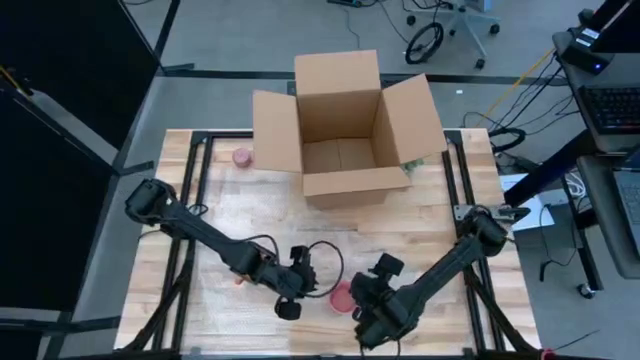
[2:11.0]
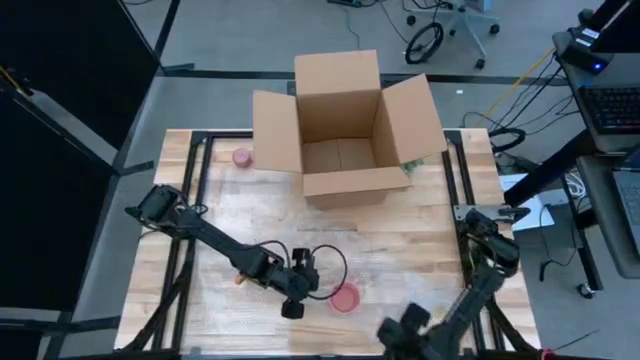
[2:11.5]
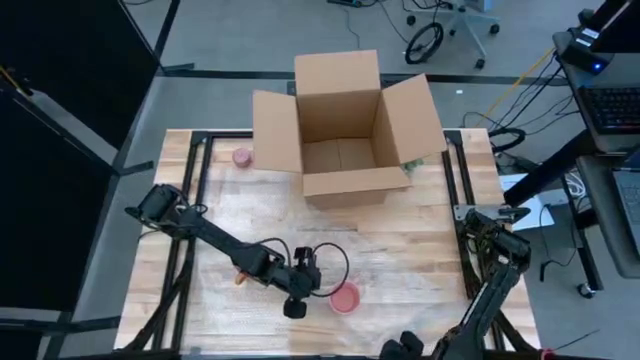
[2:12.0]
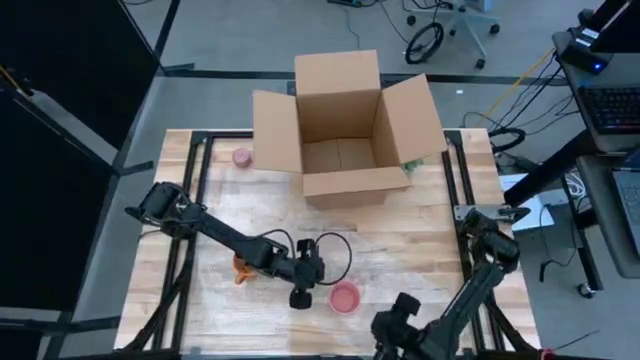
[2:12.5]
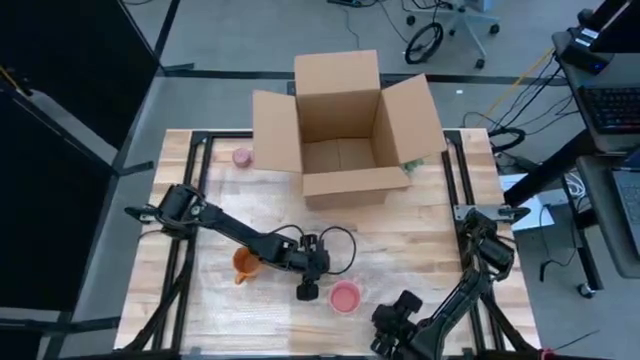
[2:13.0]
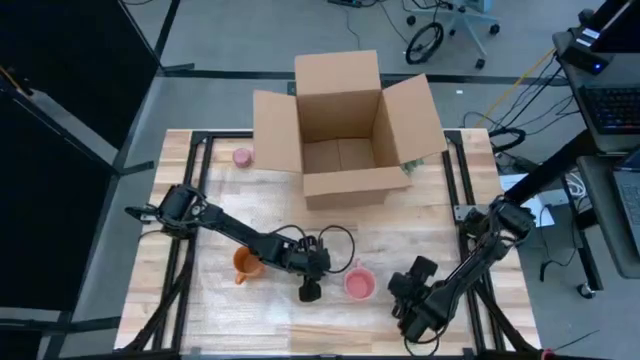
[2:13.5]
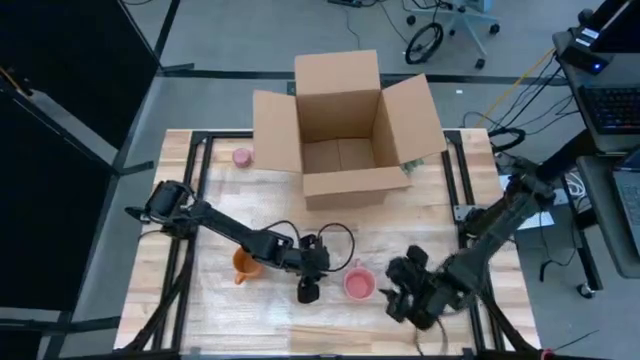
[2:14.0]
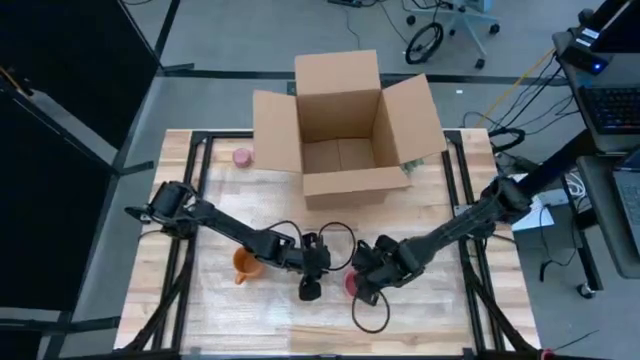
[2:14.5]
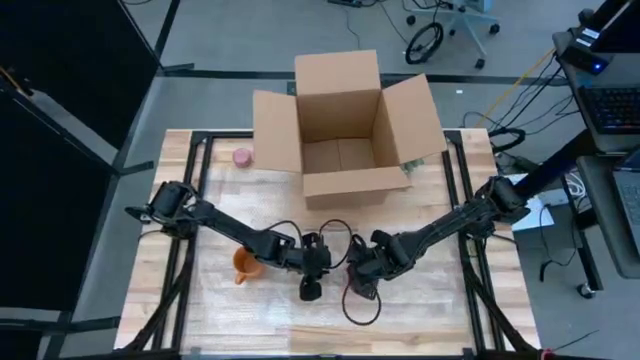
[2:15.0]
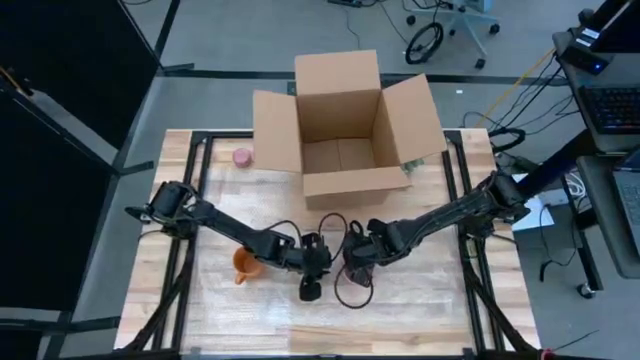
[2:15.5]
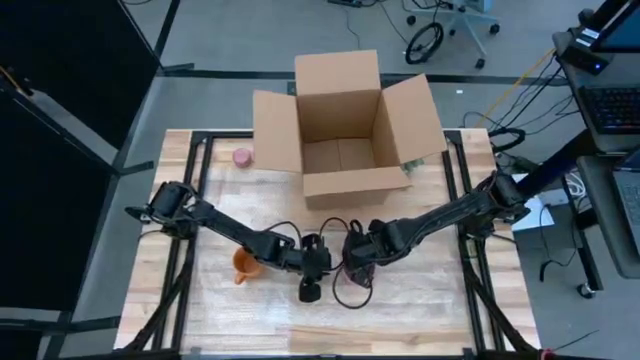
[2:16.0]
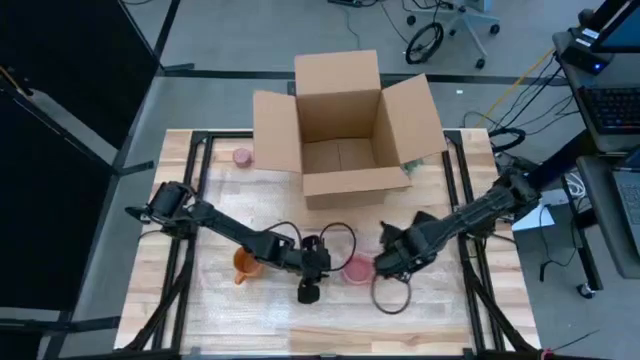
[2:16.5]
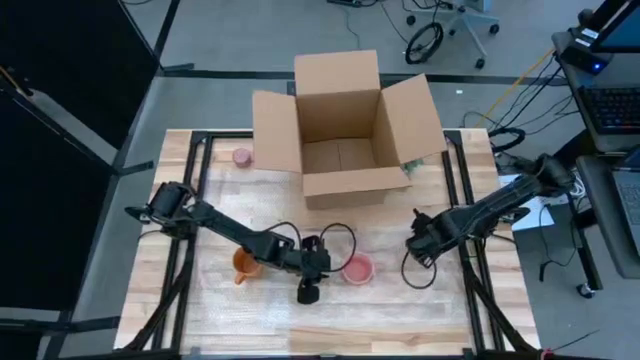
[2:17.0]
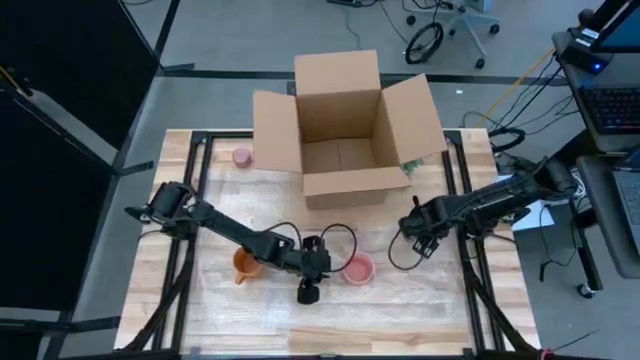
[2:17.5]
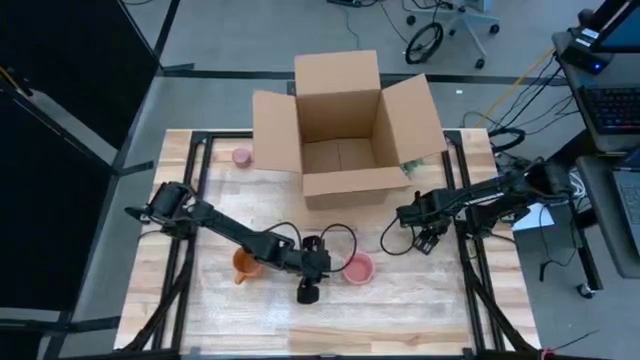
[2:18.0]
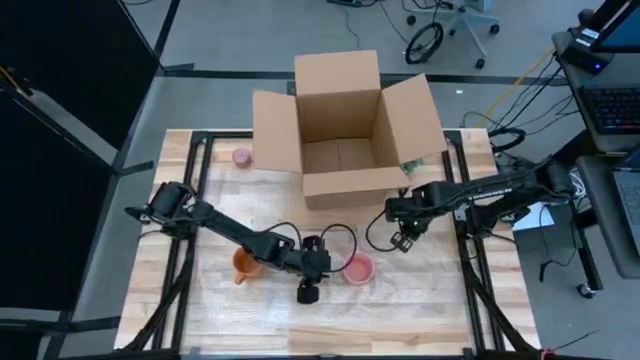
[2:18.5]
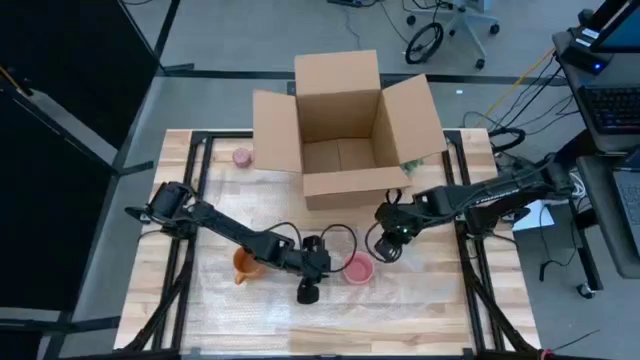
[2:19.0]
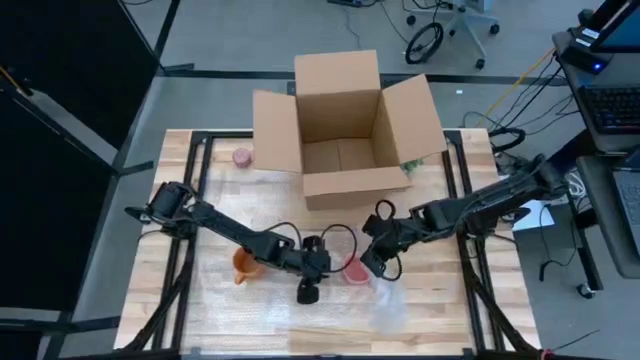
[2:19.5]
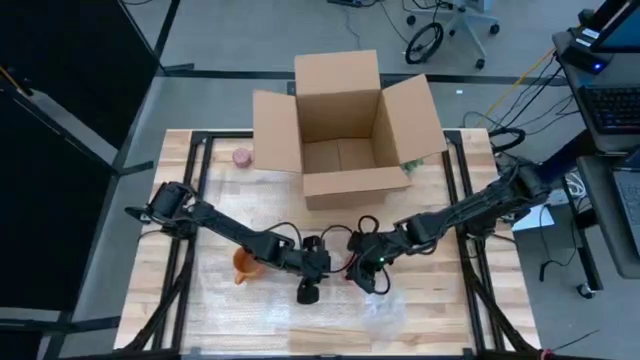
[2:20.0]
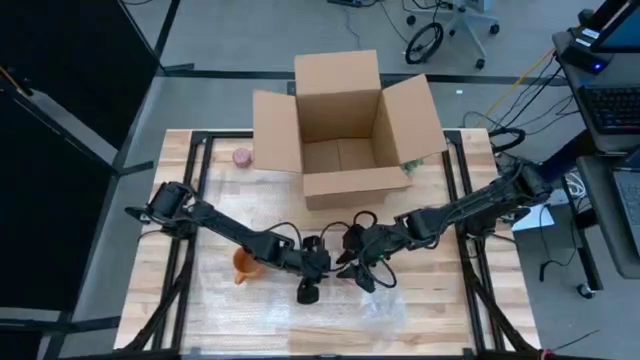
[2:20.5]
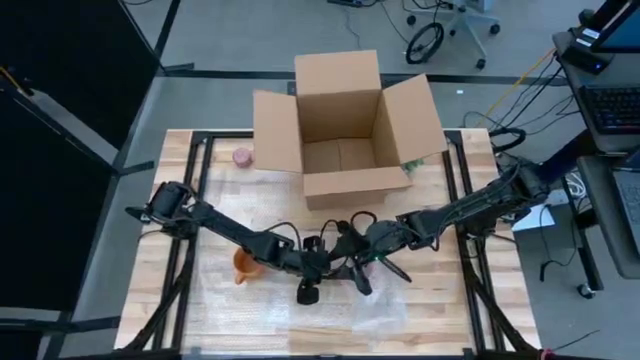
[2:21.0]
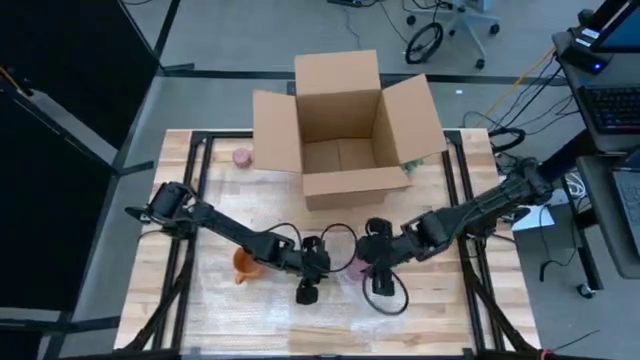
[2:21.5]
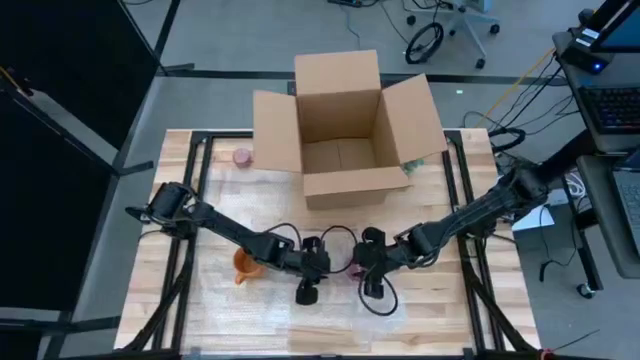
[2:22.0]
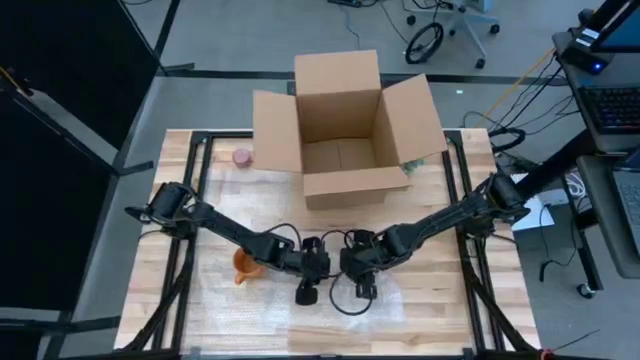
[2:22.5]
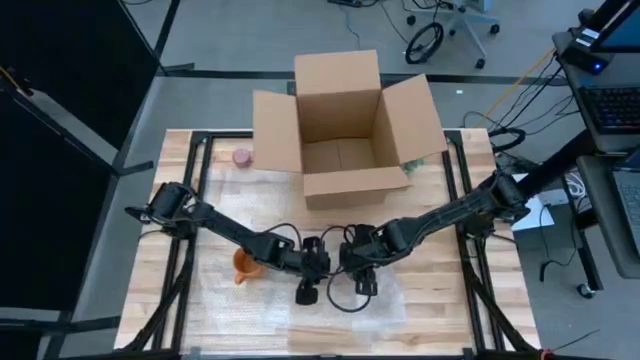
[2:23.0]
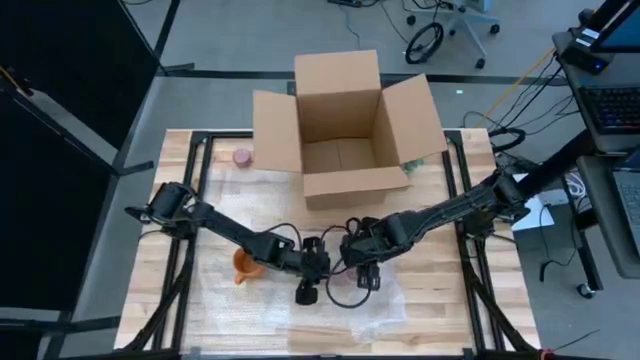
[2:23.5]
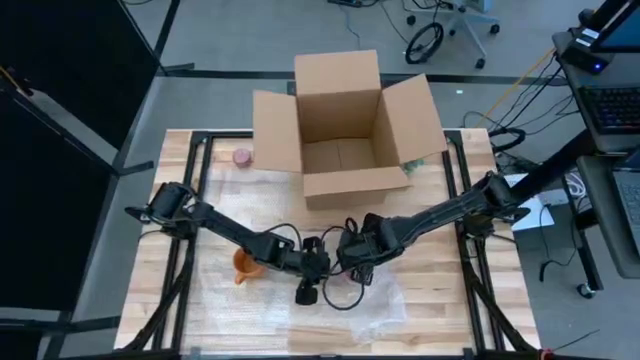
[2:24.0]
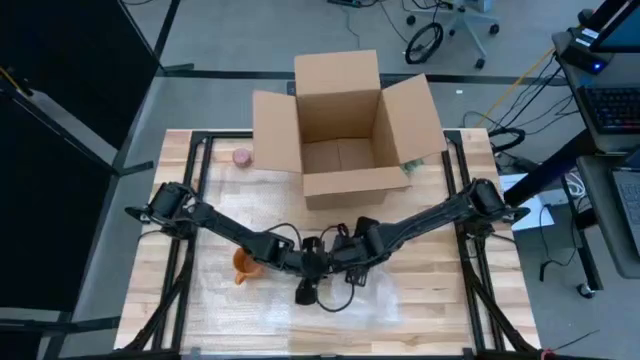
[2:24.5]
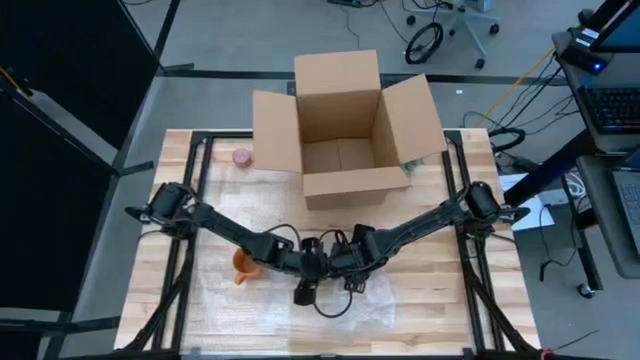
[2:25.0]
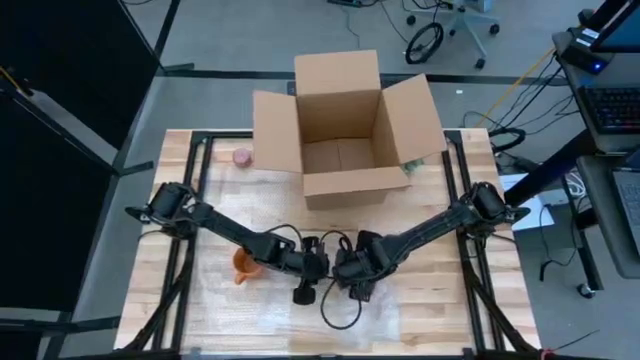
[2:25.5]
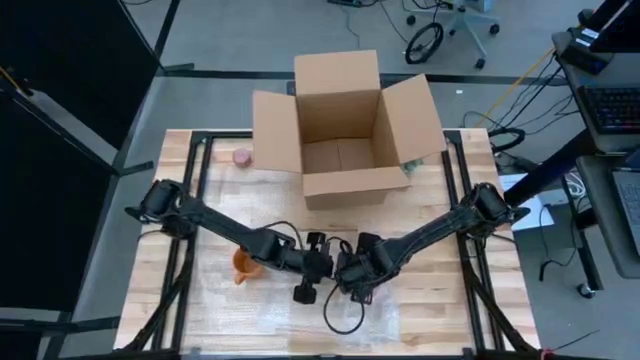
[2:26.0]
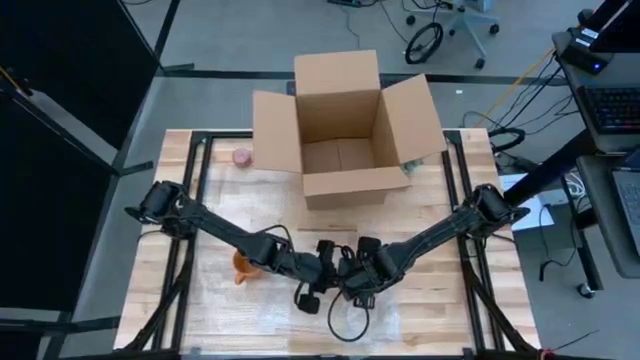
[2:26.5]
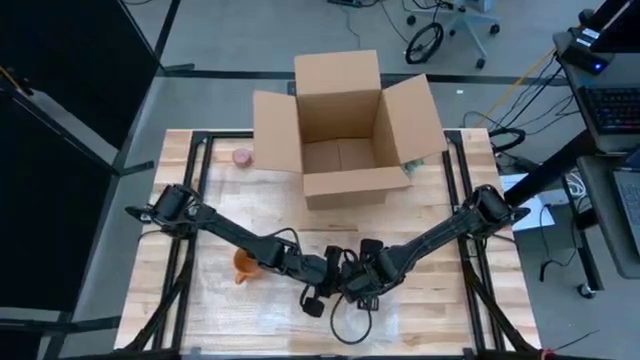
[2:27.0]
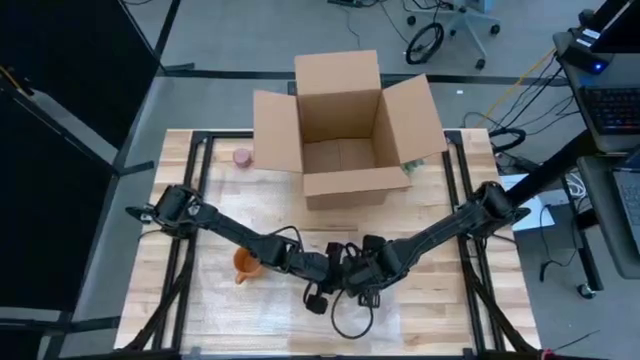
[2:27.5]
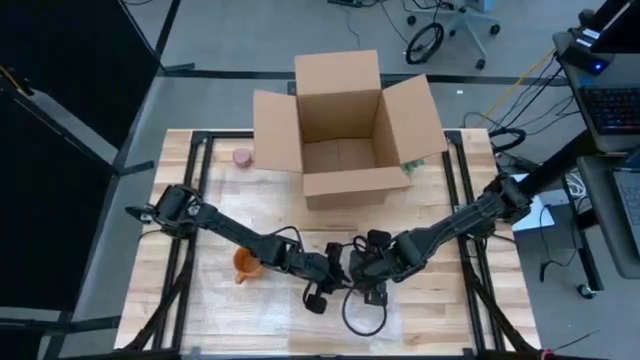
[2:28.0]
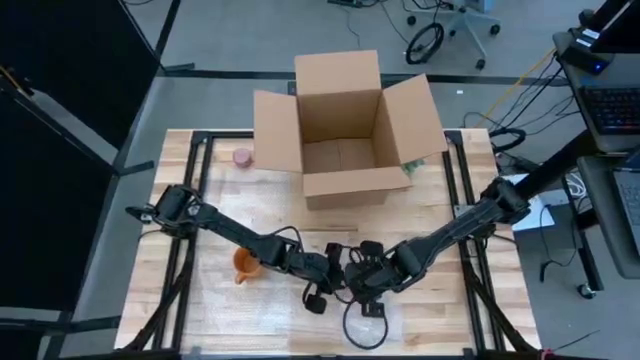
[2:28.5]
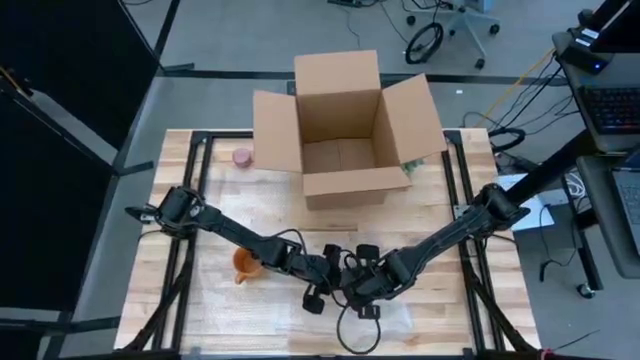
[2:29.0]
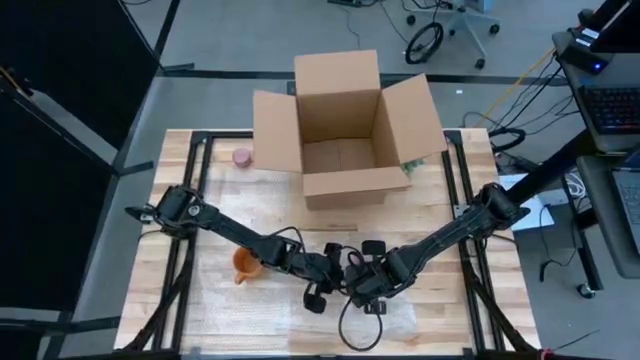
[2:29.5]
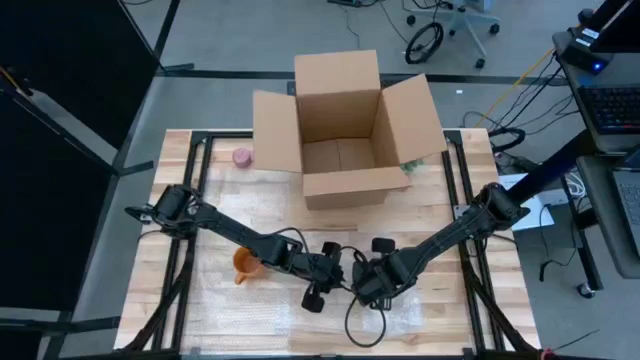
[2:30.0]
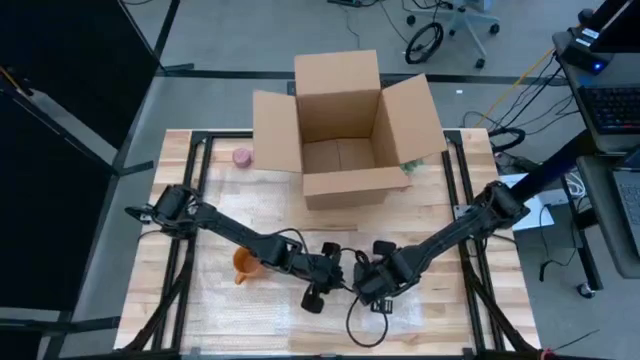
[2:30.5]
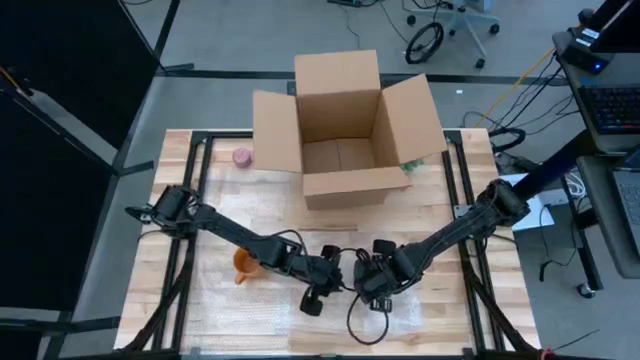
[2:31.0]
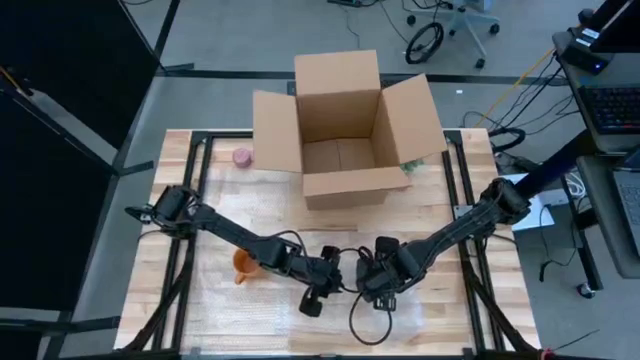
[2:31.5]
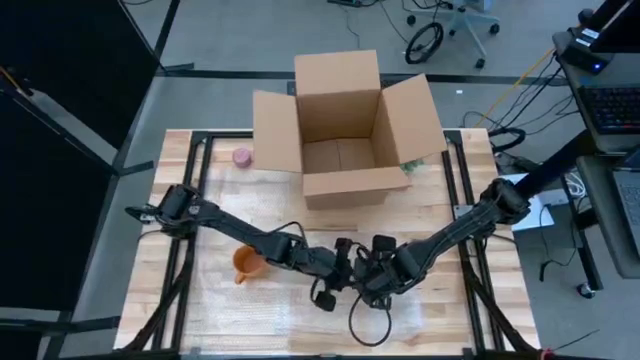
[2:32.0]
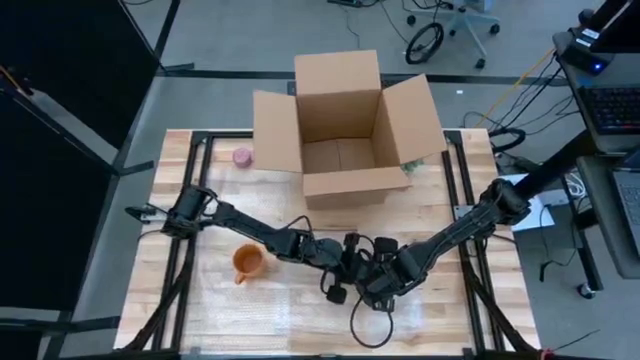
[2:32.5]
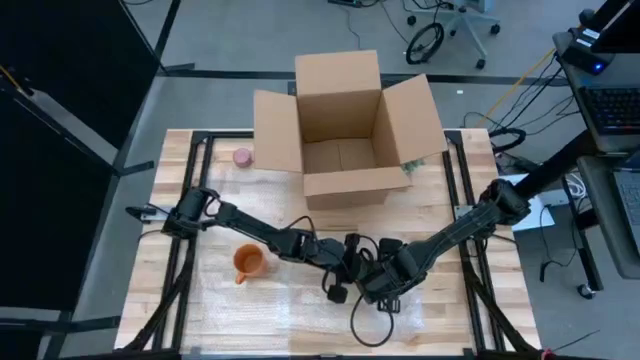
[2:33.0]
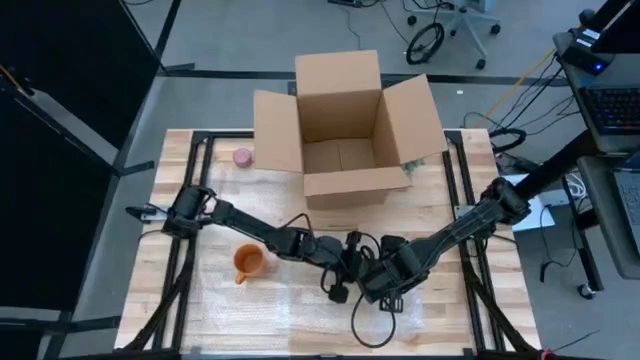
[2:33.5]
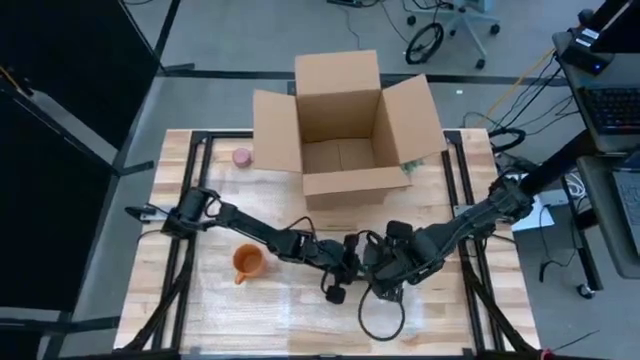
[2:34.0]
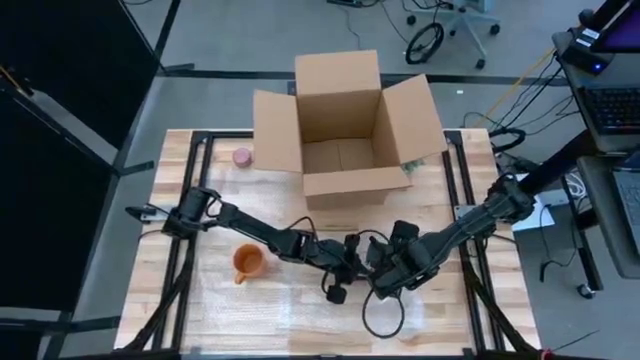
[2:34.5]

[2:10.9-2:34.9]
Task: wrap mug
Wrap the pink cup with the bubble wrap
